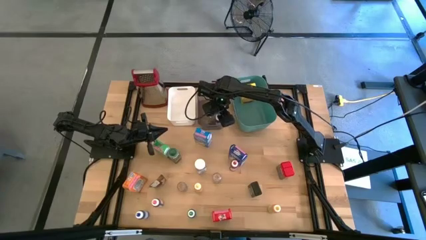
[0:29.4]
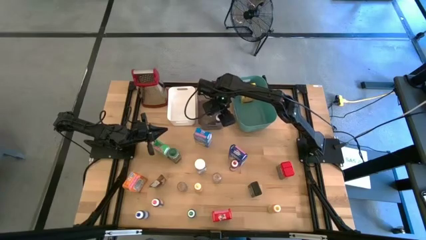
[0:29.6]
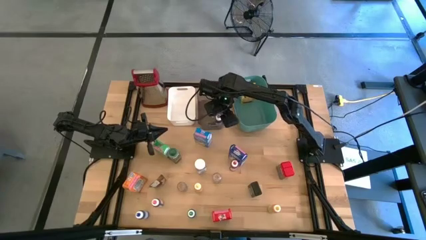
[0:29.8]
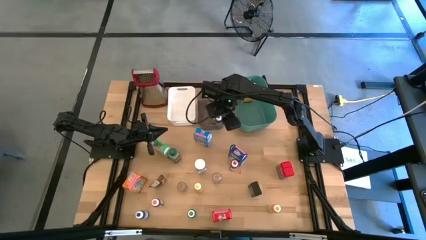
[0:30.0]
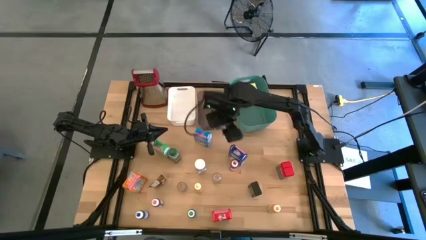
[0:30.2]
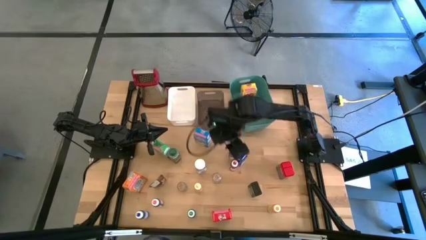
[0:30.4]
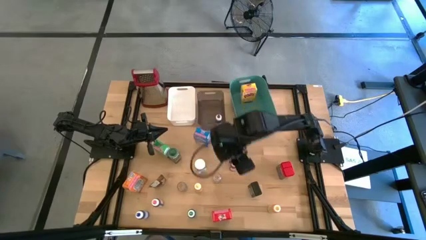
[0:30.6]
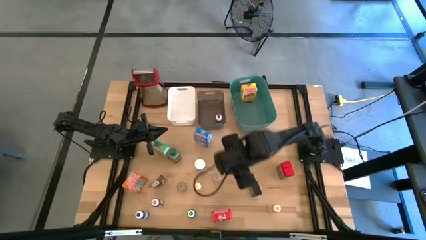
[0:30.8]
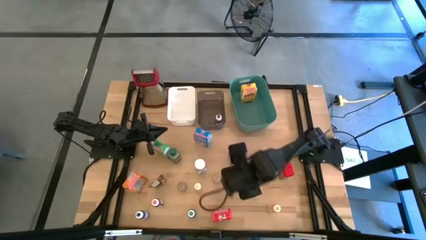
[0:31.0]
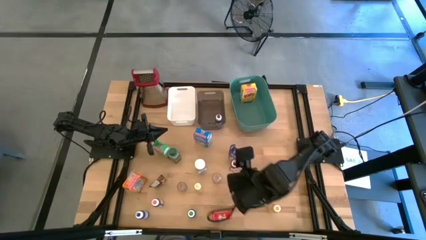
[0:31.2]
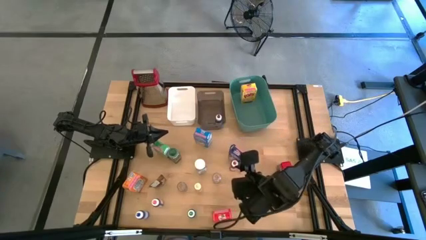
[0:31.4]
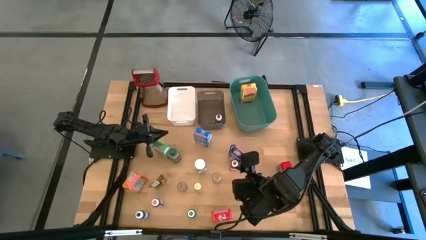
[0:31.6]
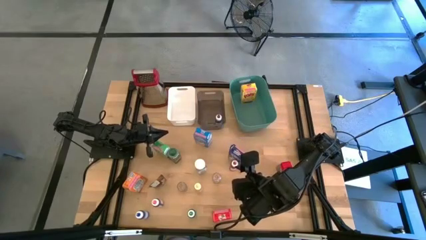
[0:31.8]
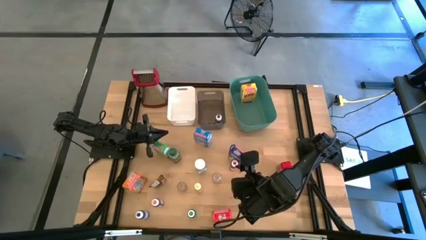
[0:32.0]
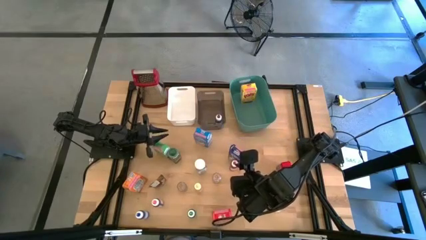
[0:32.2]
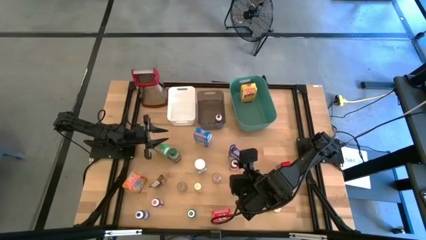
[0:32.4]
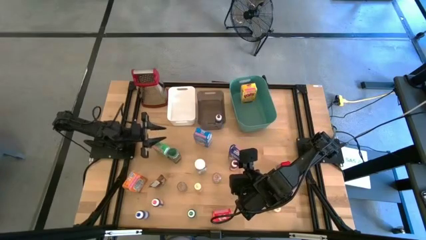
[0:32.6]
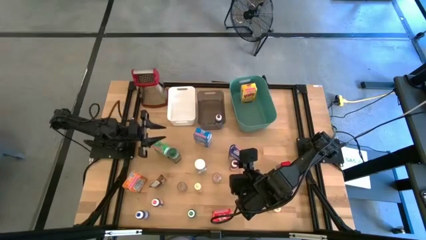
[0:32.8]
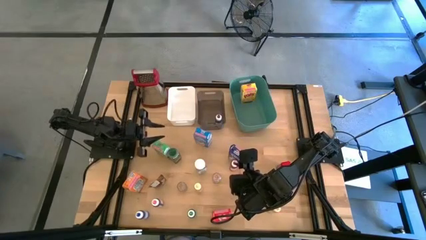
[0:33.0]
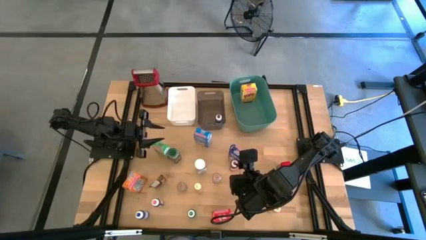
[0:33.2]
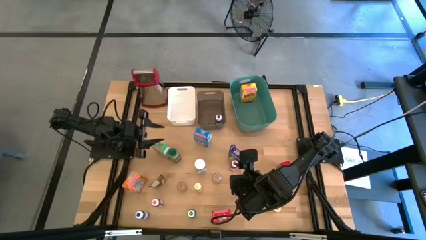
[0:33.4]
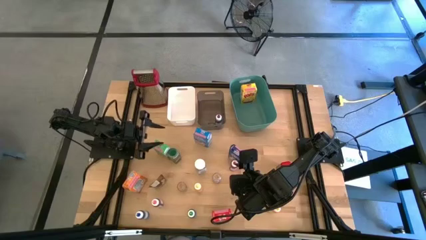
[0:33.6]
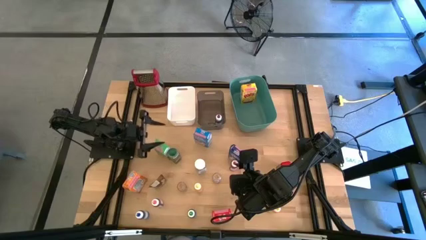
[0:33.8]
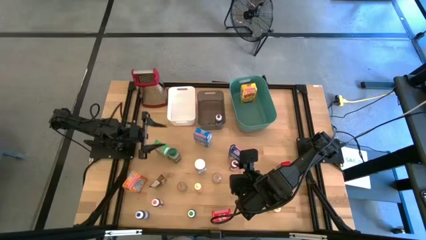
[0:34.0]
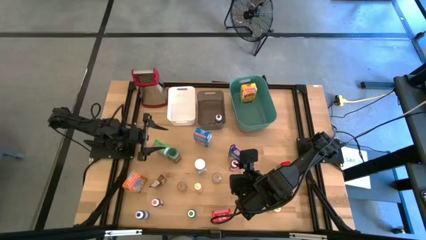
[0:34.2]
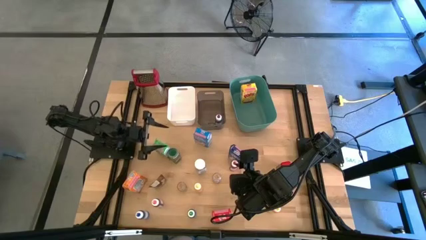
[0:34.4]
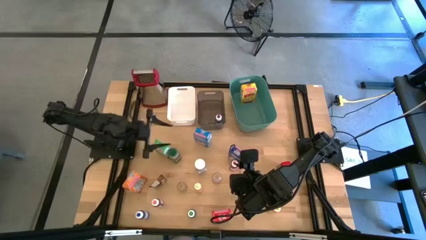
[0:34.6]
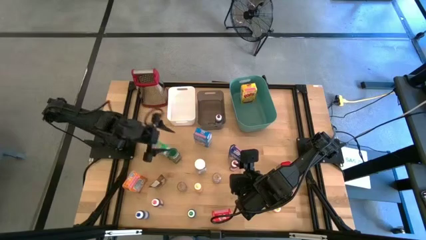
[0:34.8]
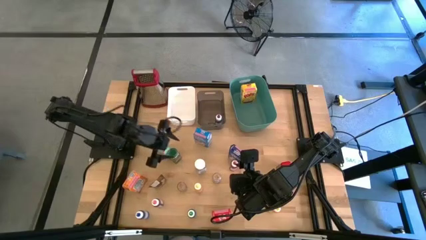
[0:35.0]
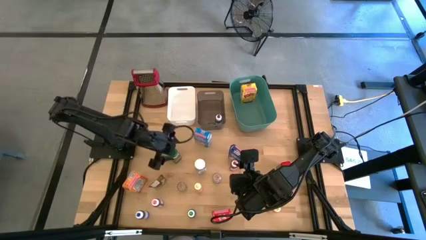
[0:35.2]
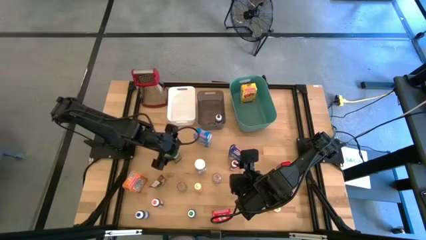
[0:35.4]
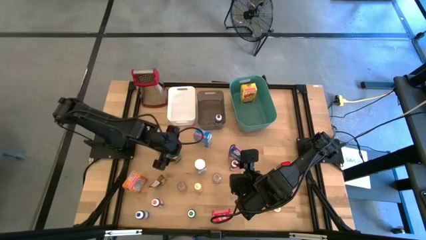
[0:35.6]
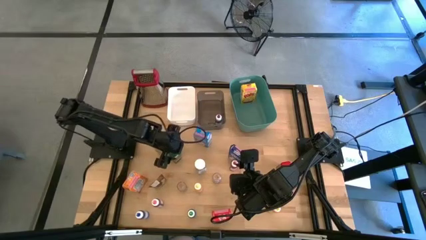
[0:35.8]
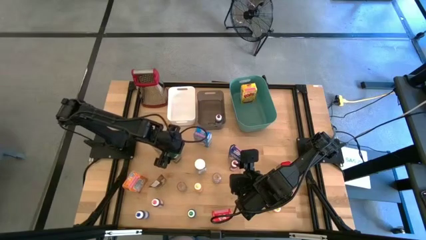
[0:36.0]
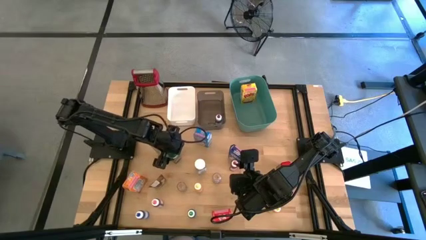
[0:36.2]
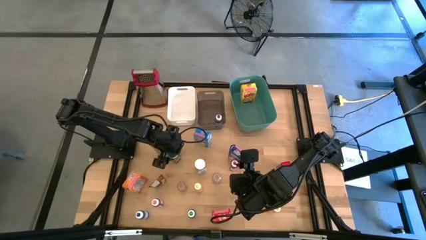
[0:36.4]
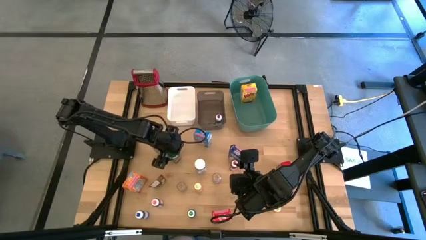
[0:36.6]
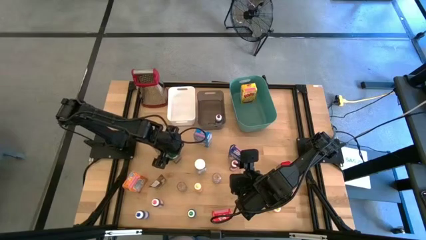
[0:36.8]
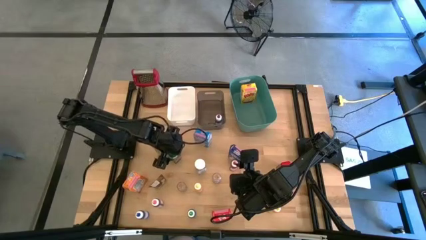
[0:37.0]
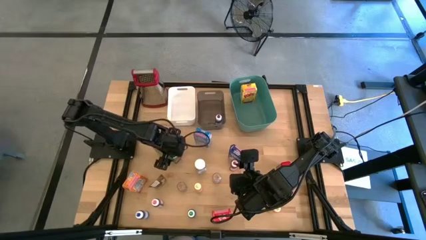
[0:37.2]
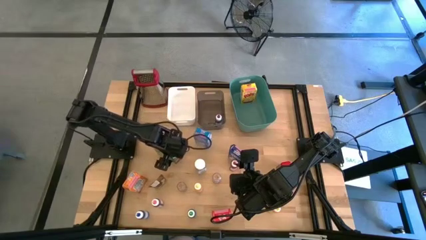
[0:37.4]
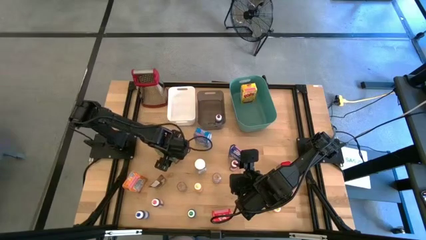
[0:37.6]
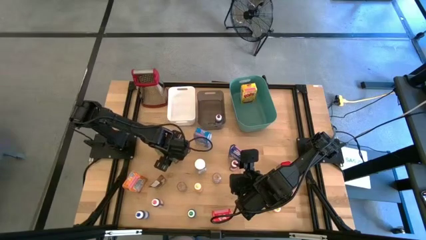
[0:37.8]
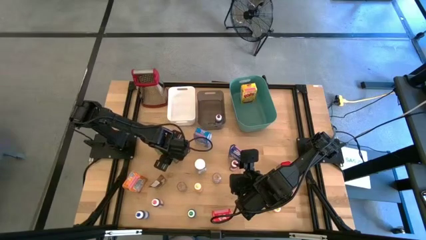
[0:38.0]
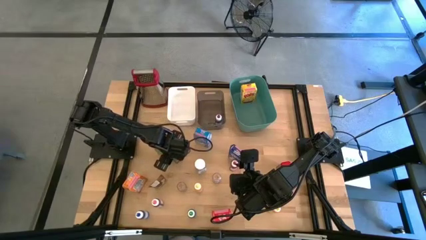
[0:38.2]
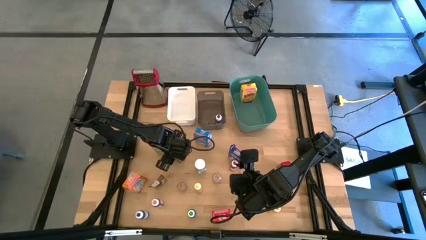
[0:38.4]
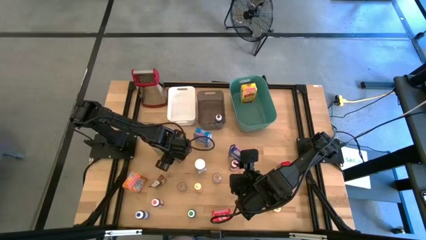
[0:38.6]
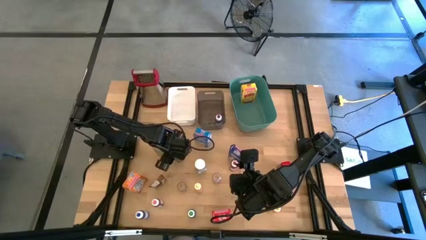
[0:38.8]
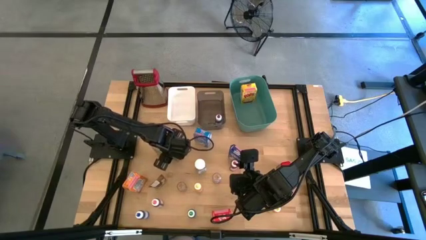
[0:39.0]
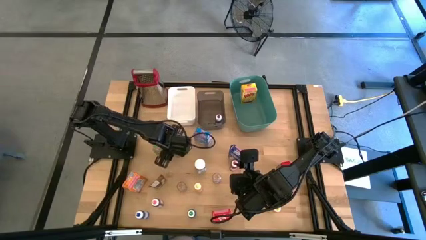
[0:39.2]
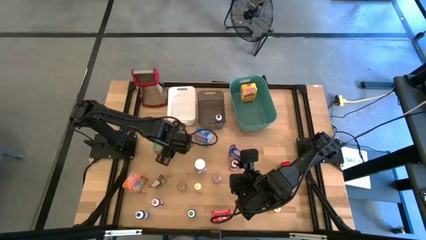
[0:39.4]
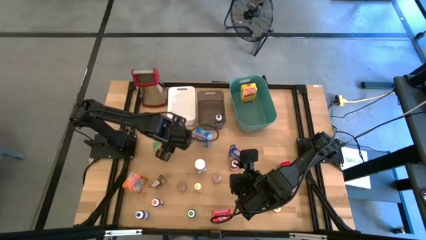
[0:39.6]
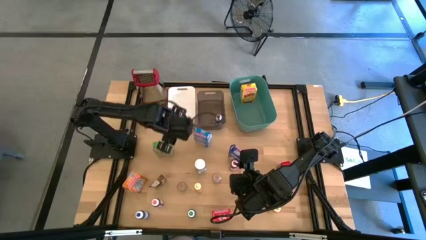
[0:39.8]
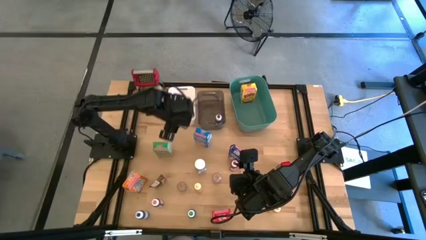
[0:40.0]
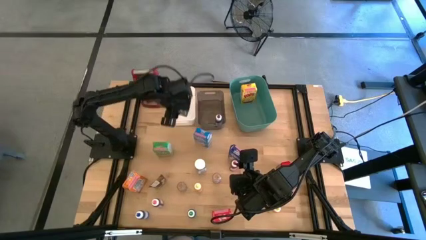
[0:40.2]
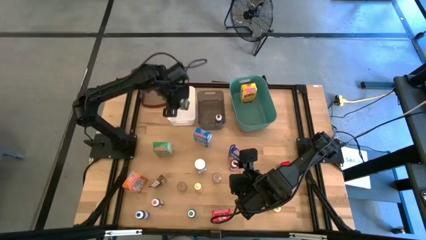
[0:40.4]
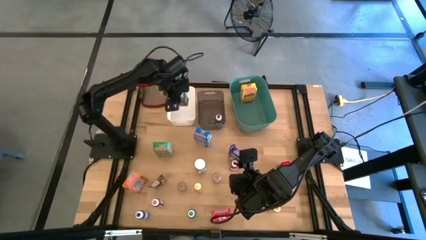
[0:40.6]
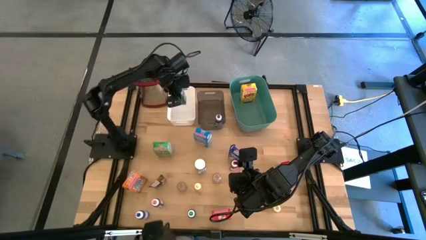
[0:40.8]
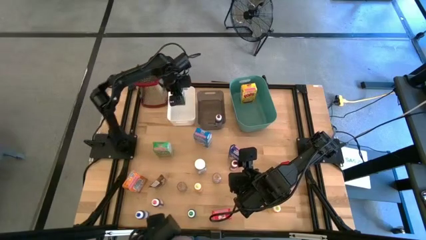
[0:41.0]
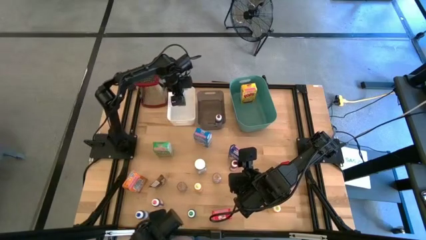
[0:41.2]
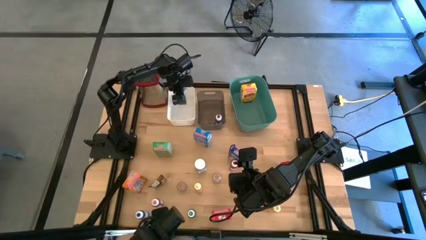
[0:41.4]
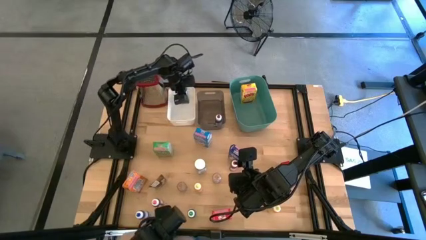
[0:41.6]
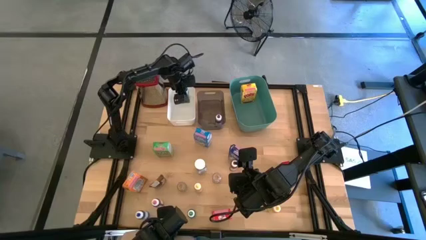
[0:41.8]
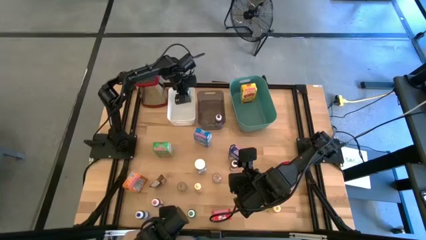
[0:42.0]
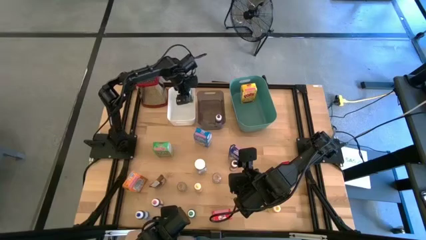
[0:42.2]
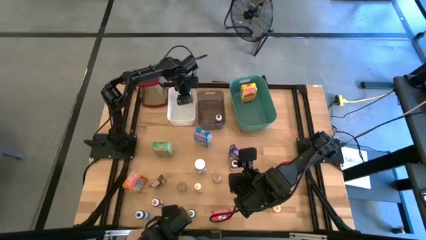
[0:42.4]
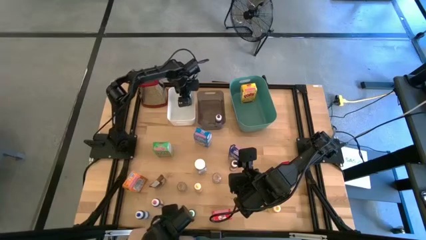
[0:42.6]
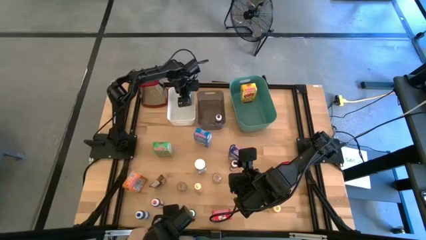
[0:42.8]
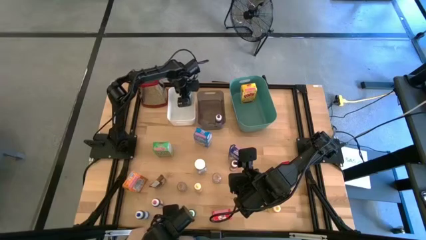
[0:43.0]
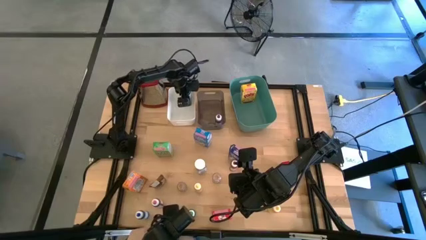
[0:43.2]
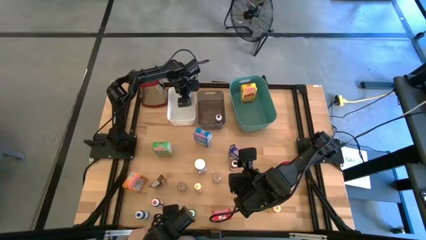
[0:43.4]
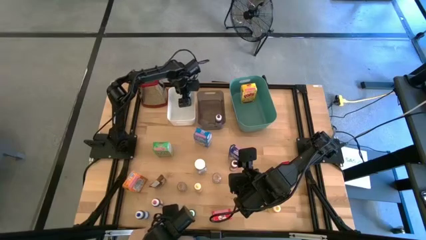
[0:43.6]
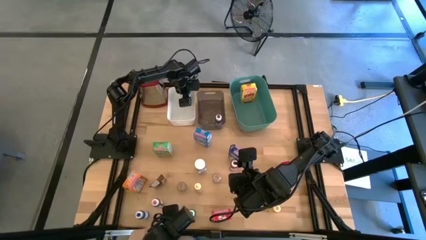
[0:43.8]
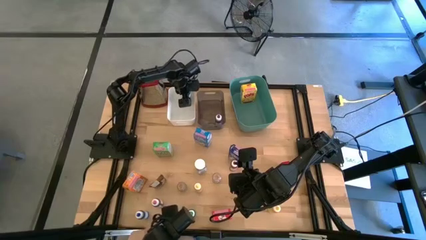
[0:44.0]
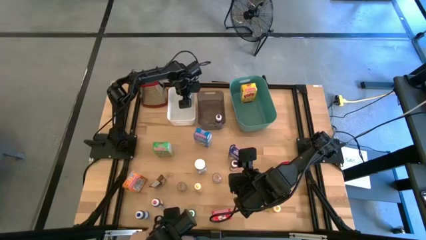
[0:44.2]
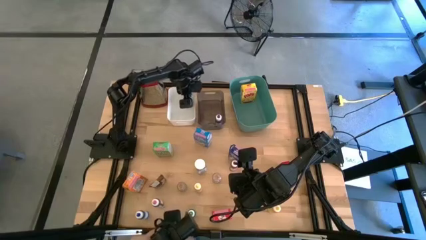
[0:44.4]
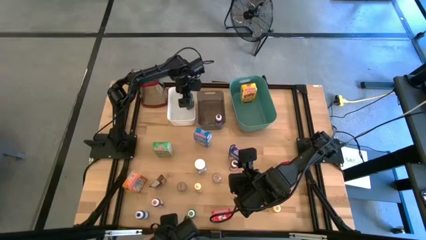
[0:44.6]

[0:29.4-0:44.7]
Task: Pick & Place Kitchen Items
Put the green spice bottle into the left white bin
